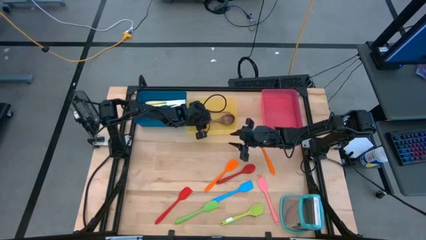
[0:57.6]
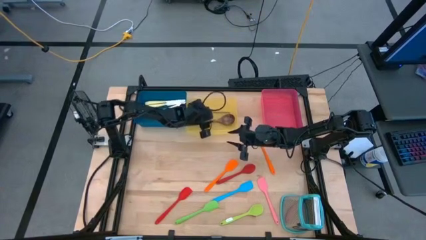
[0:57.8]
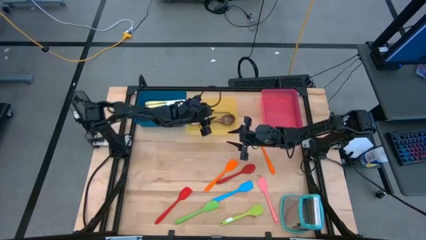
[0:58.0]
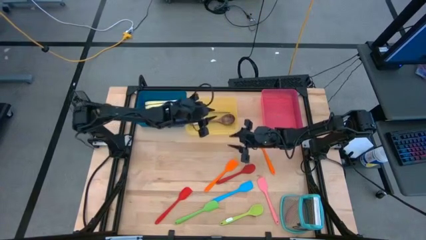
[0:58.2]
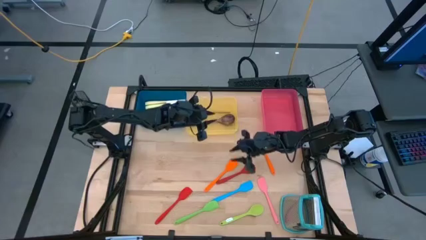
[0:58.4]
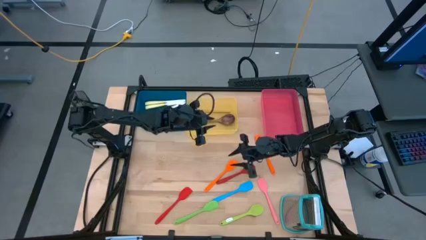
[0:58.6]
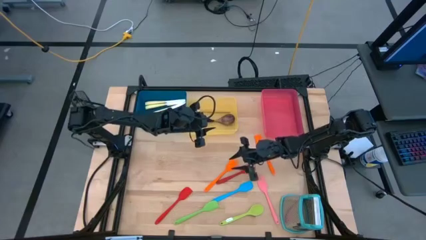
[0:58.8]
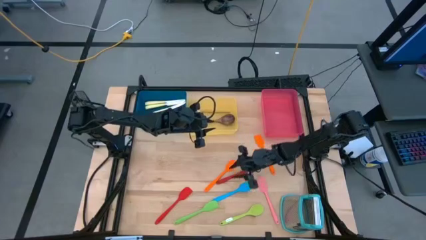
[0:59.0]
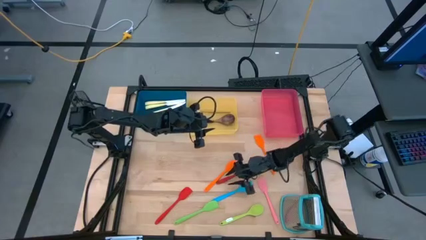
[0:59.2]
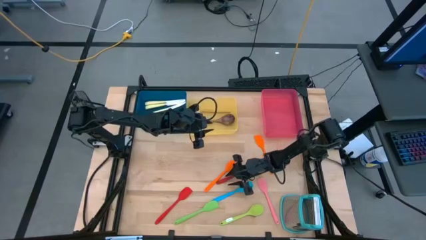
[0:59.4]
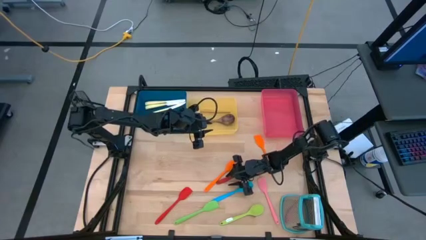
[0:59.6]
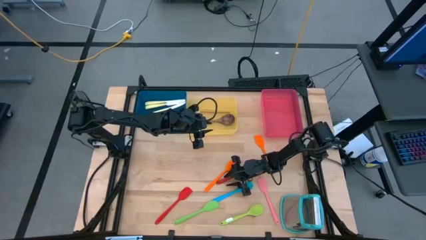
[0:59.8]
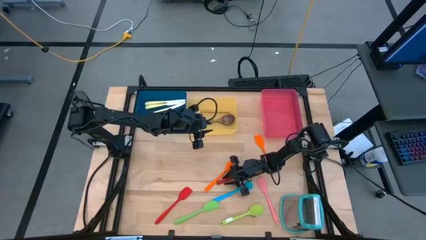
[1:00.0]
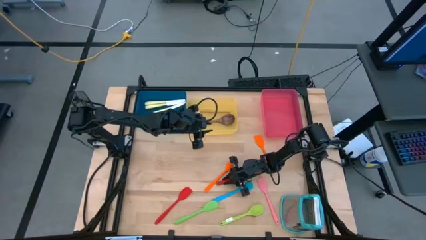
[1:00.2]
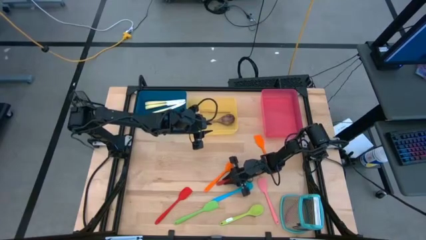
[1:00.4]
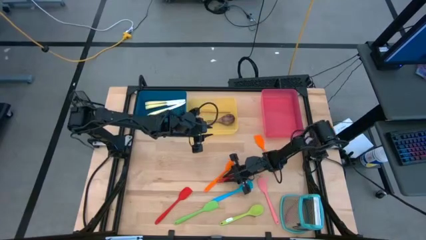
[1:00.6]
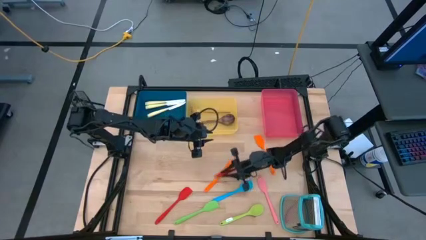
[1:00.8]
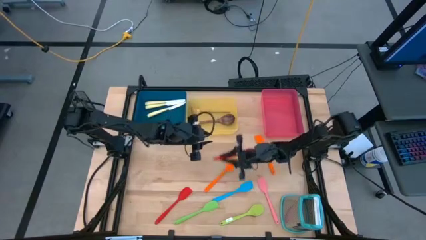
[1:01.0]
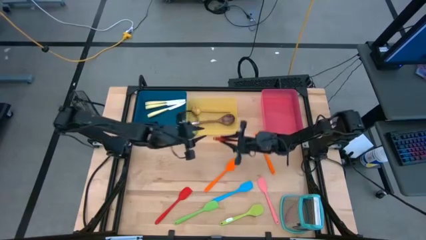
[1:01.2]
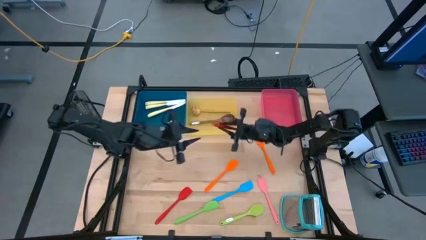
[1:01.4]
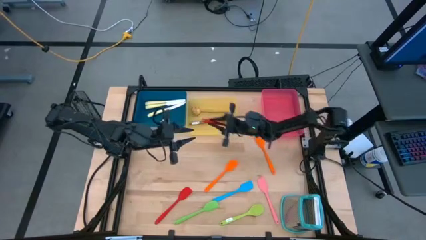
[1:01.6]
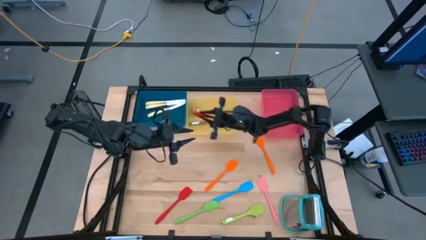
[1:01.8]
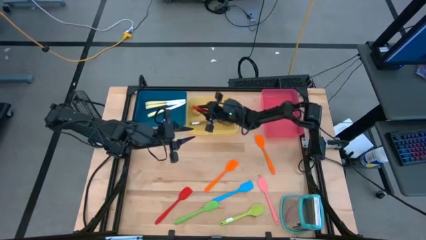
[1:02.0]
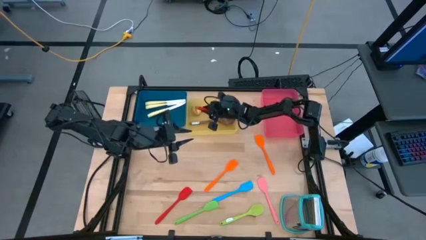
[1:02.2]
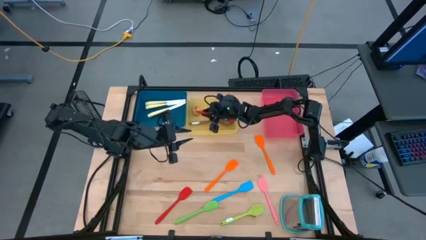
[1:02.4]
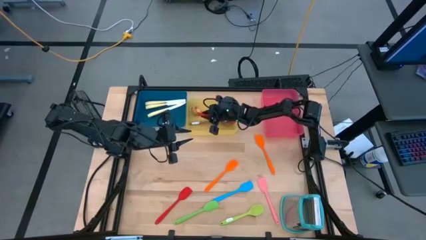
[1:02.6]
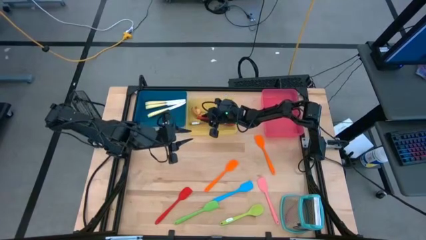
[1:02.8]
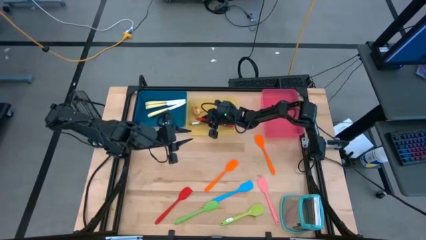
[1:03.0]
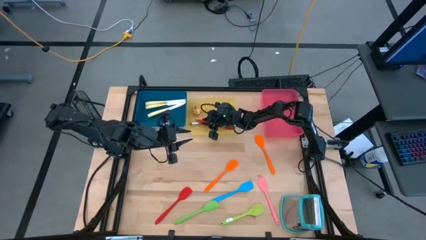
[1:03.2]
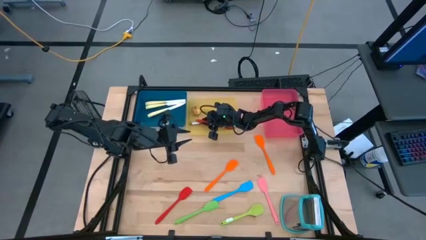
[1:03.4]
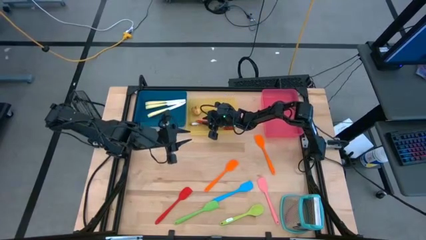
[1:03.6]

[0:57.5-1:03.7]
Task: Pick & Place Kitchen Items
Put the red spoon into the yellow bin

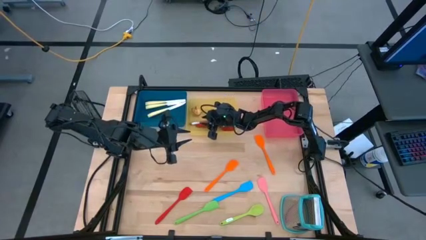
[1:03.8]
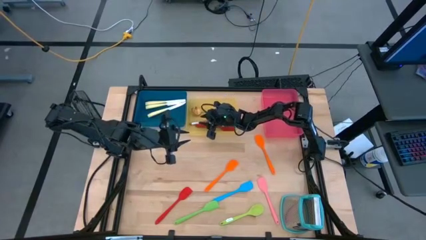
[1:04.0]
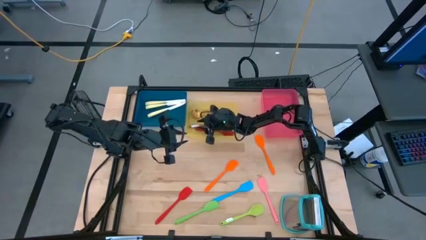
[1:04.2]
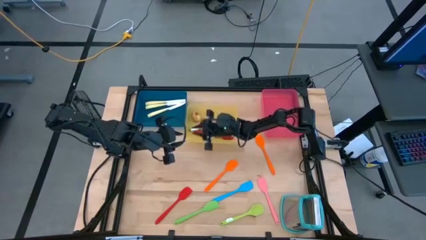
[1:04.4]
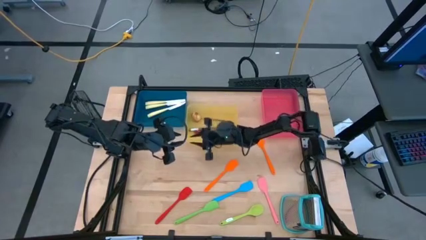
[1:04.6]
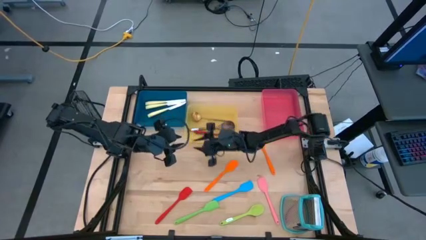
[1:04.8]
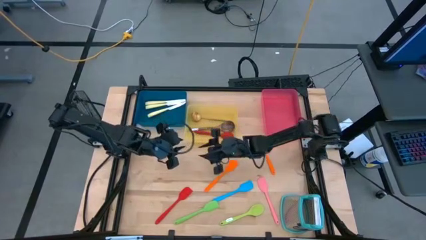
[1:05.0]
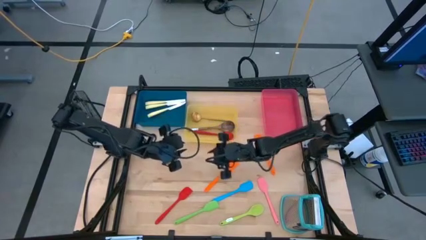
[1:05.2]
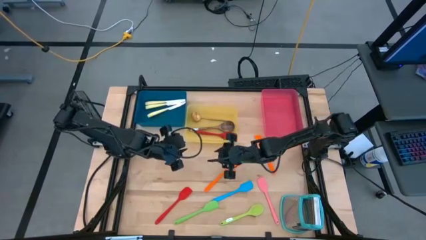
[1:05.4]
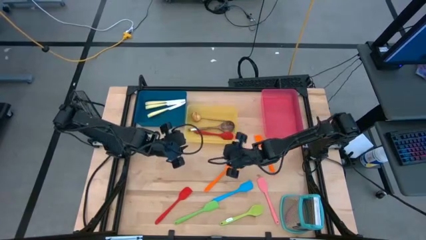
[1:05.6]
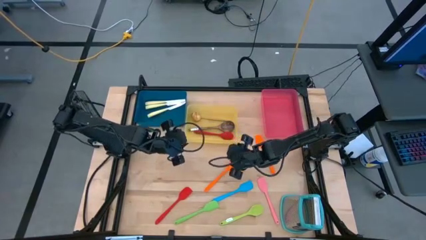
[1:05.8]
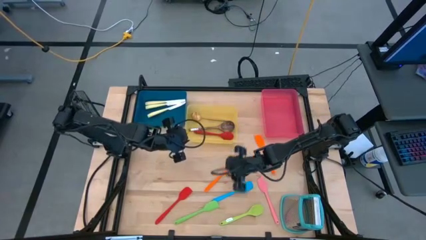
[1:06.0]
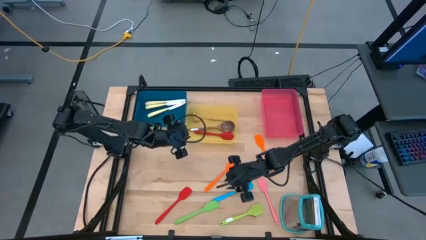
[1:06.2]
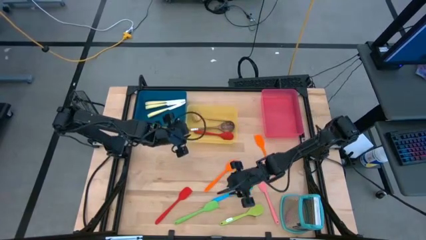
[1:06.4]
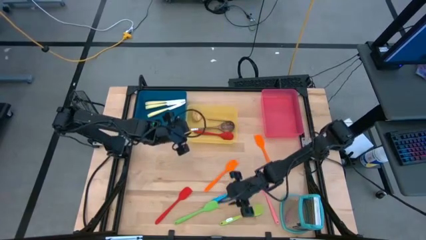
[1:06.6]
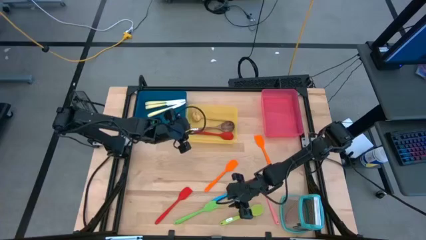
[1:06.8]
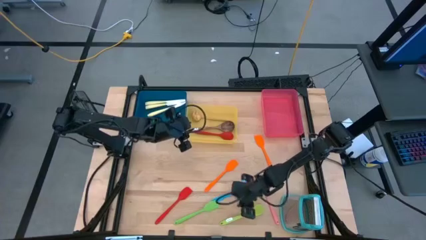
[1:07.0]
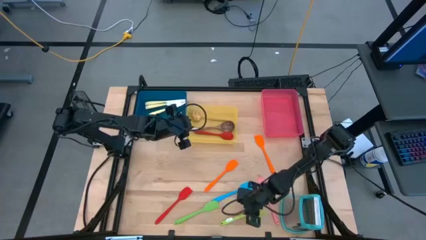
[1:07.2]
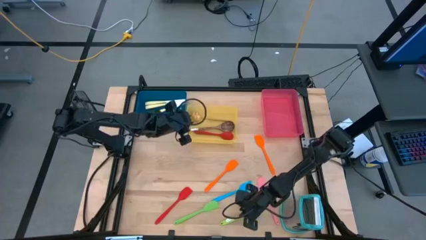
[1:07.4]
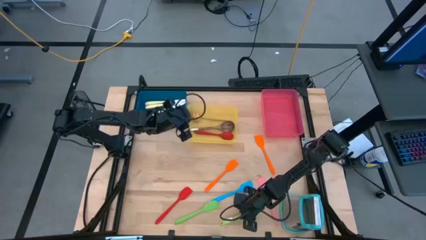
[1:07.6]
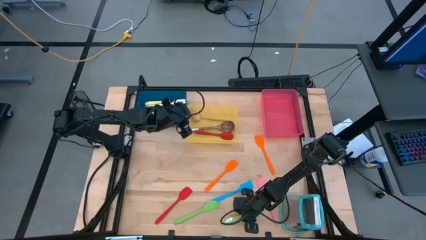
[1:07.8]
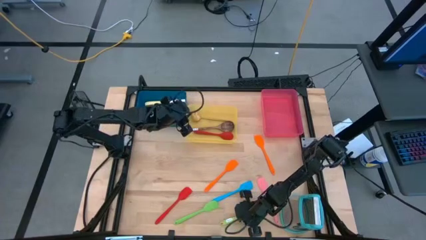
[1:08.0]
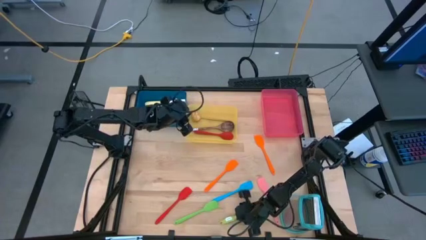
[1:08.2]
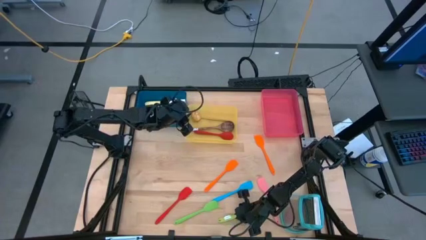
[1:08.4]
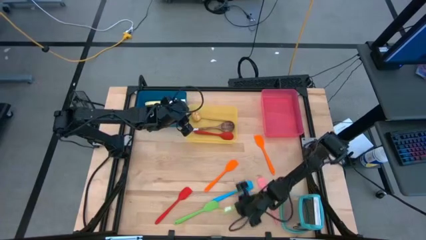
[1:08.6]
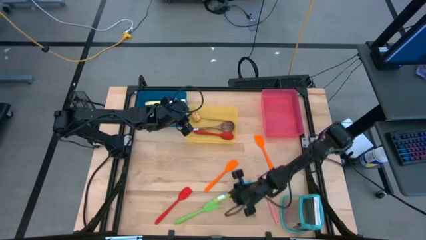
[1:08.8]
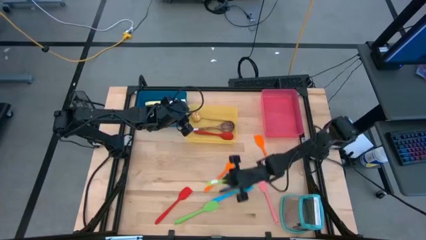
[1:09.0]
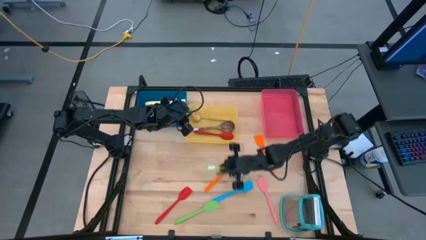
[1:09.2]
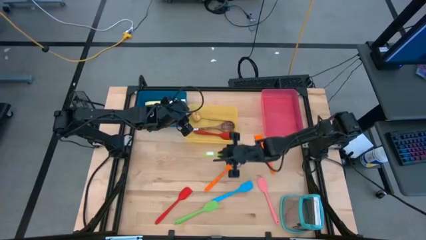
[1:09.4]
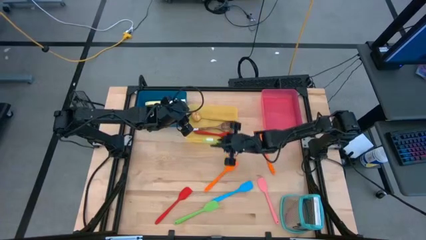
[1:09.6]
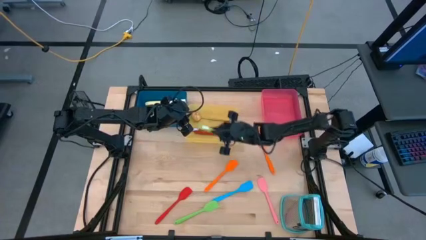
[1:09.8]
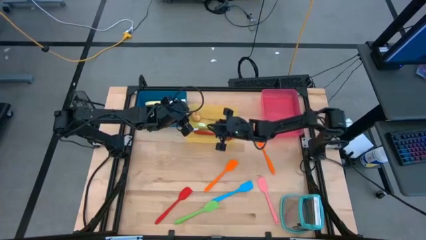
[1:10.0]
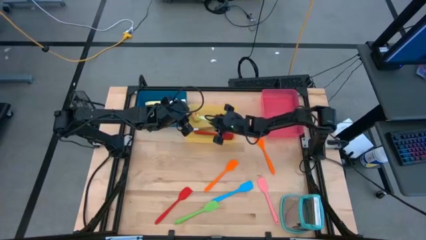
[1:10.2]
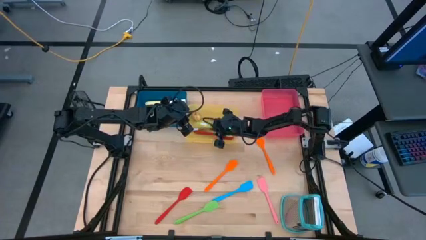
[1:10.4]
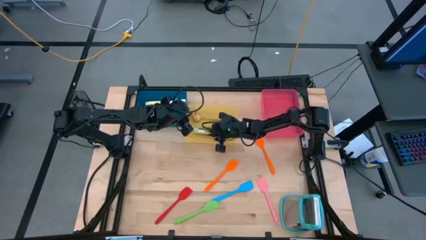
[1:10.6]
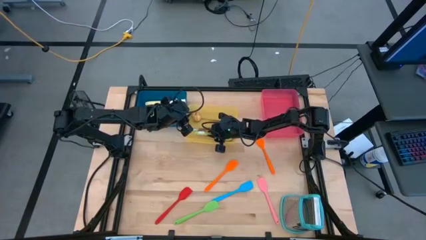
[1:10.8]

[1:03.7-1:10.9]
Put the green spoon into the yellow bin

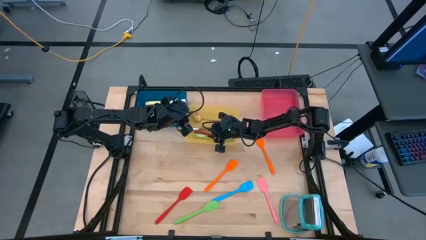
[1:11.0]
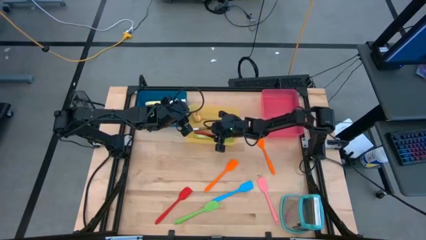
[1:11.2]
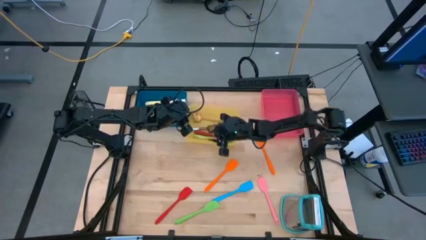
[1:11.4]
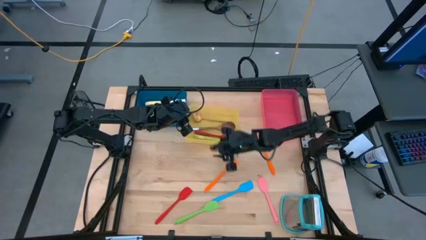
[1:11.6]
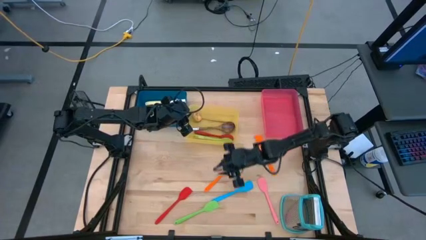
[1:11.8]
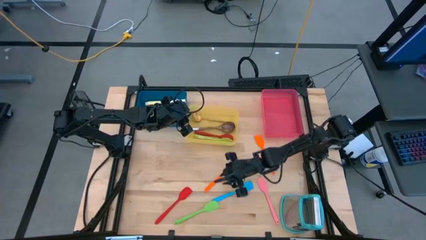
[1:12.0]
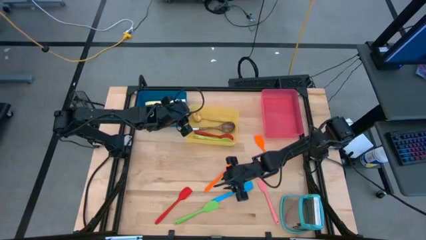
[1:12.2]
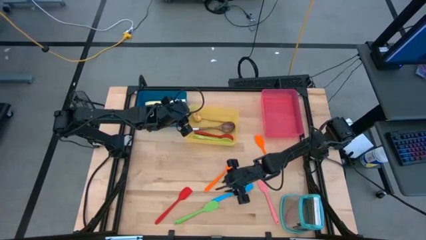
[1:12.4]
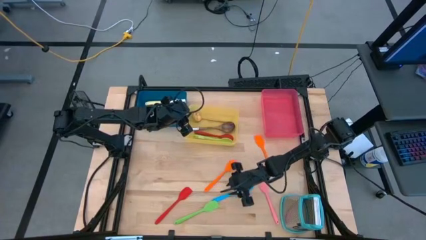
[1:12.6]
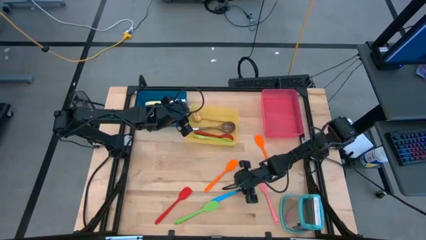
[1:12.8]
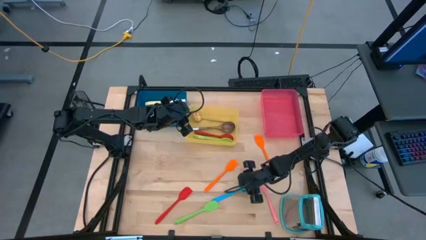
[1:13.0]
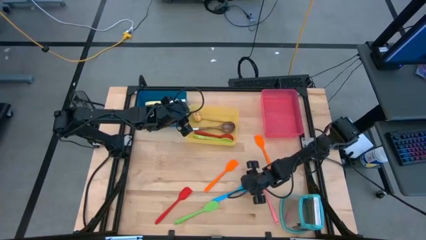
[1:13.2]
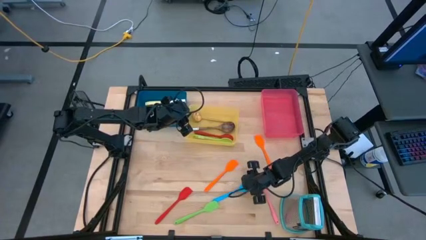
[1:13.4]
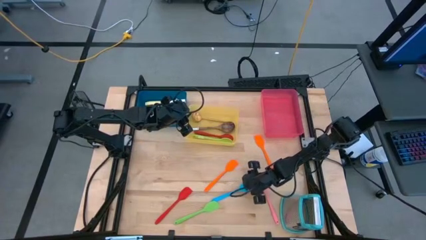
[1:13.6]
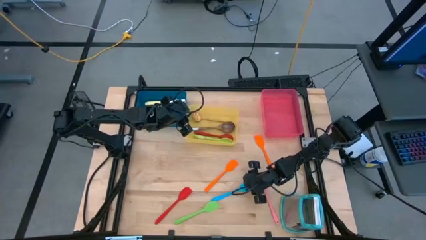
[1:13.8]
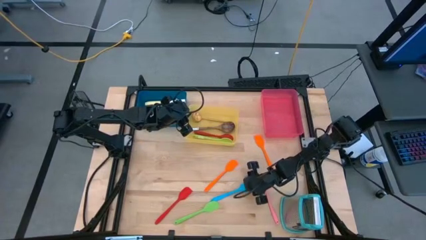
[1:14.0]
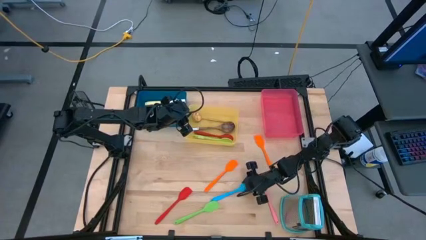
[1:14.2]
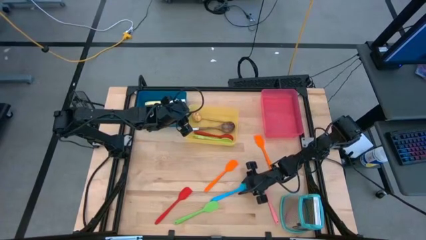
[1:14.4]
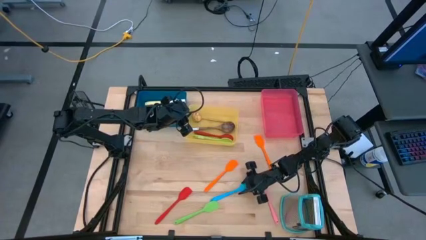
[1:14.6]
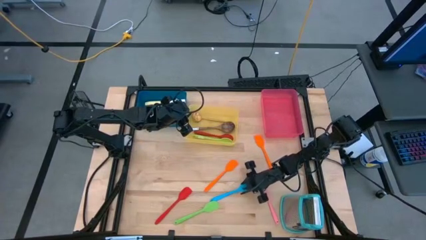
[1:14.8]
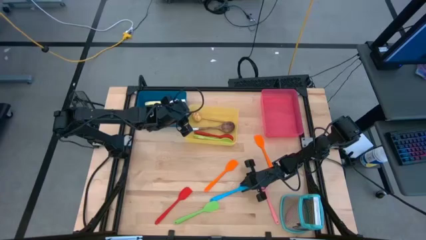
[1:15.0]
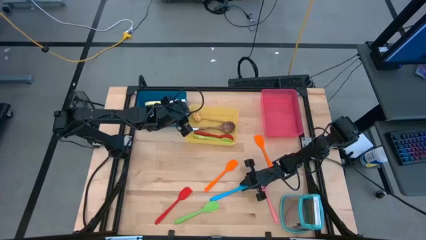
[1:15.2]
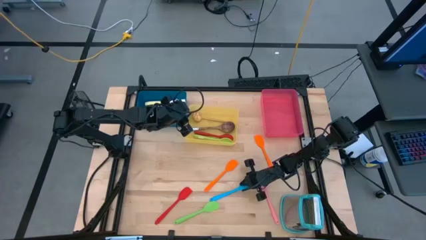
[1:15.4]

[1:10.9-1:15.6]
Put the blue spatula into the red bin
